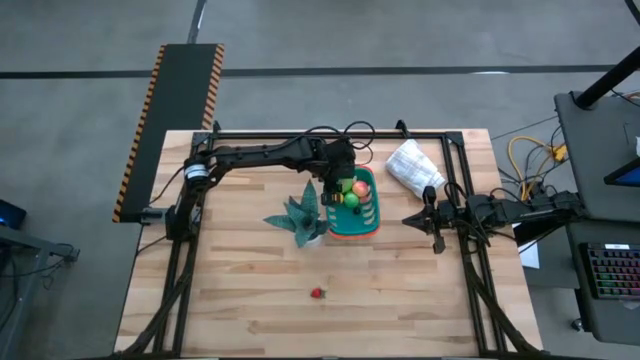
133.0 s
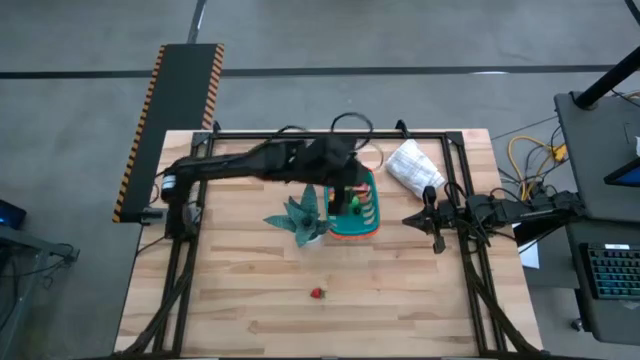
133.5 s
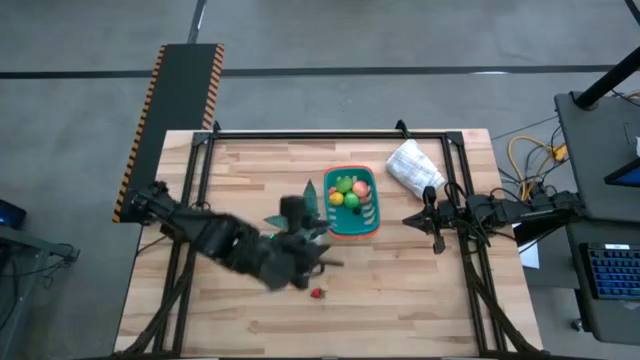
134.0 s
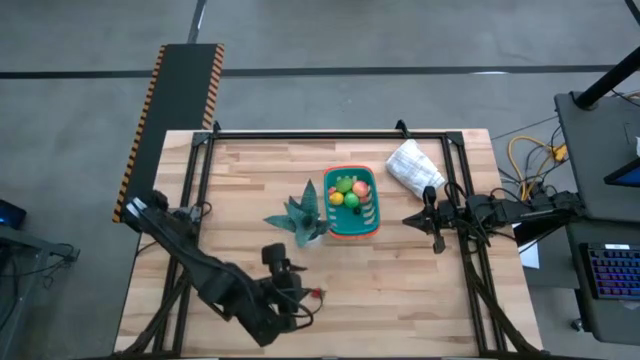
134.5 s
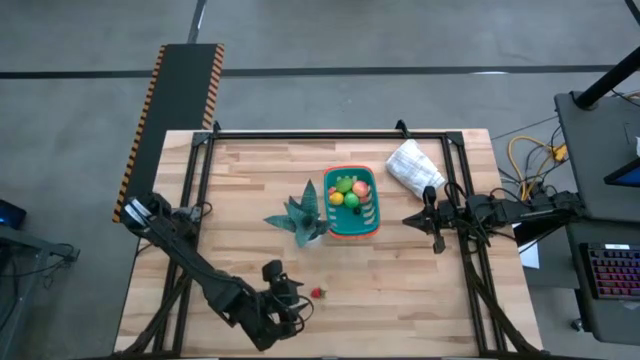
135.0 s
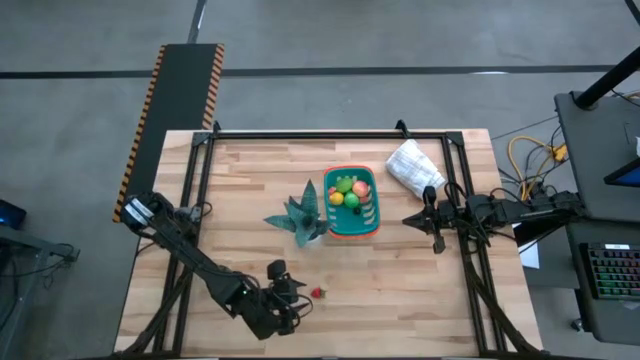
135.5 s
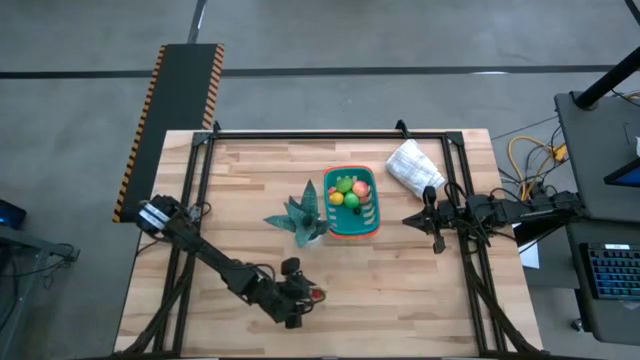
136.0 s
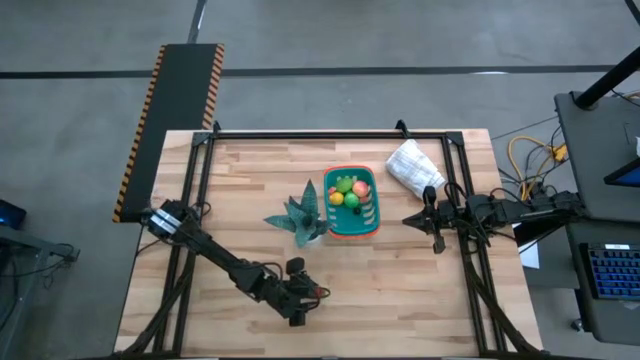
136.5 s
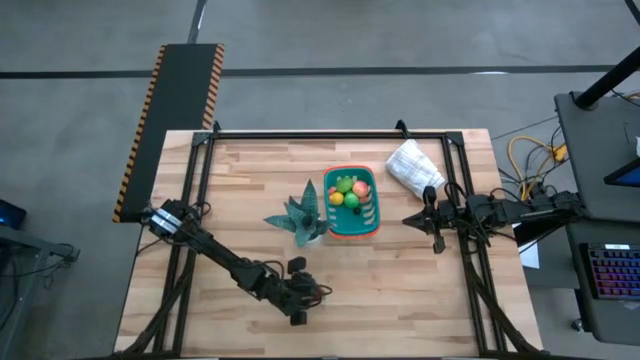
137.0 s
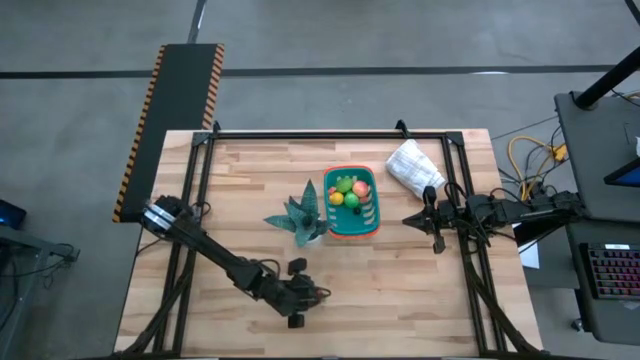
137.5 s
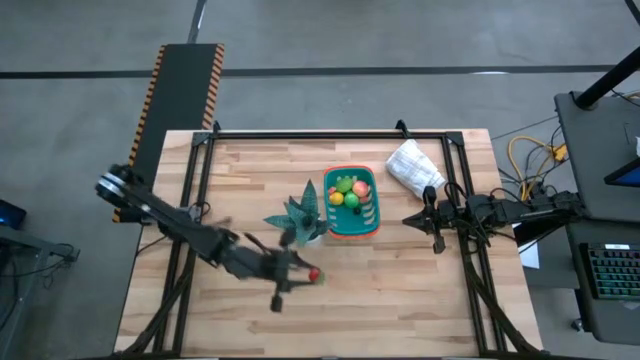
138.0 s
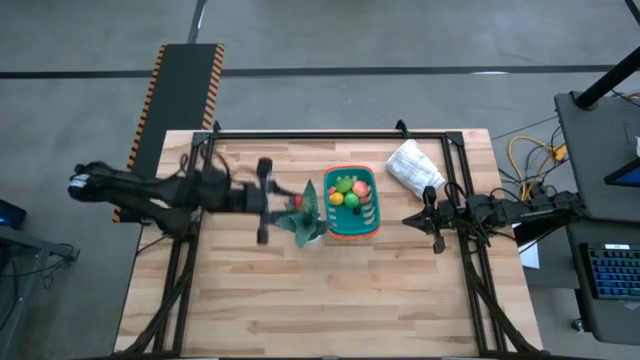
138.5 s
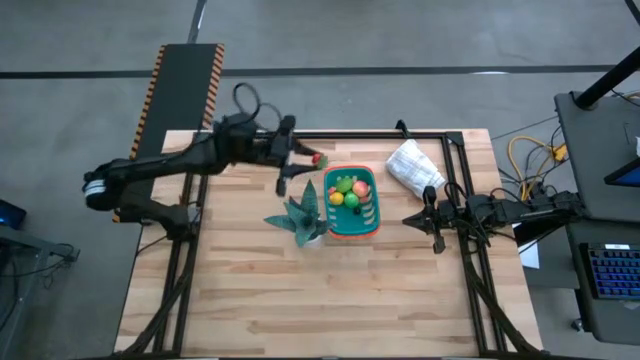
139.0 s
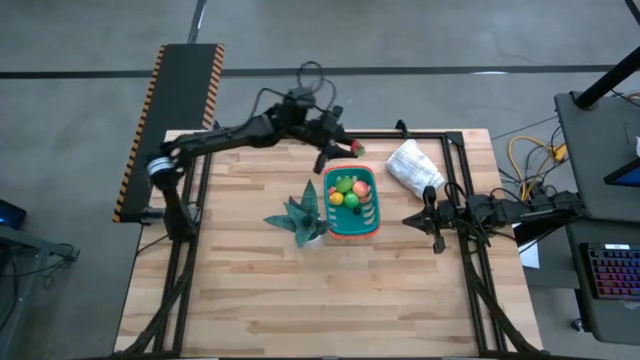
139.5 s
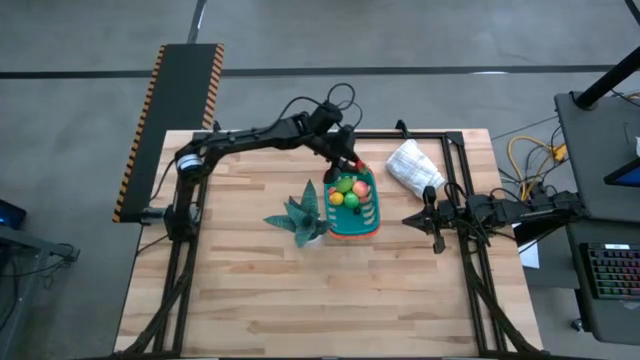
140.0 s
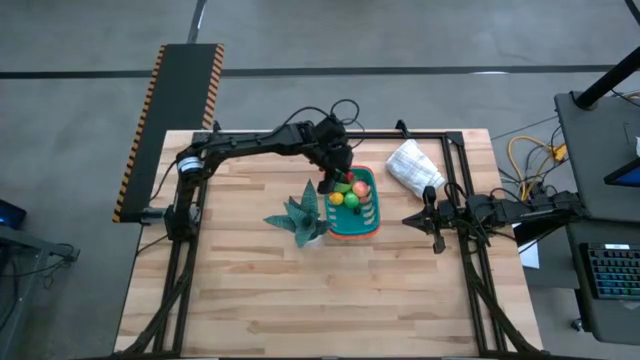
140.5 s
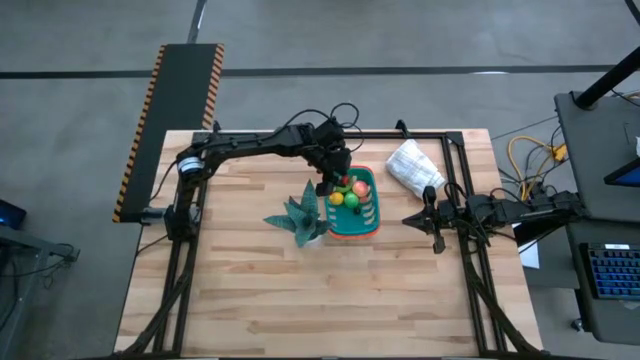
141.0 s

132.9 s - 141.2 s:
Task: Build produce basket
Put the strawberry into the basket

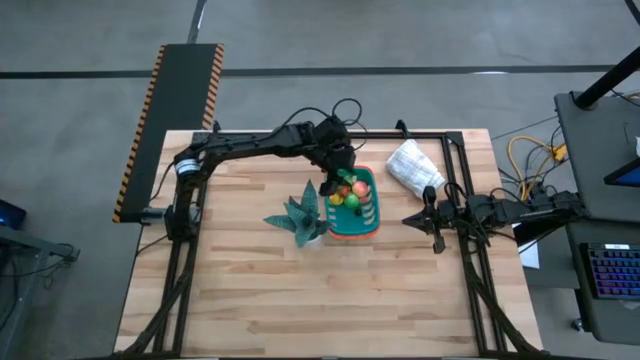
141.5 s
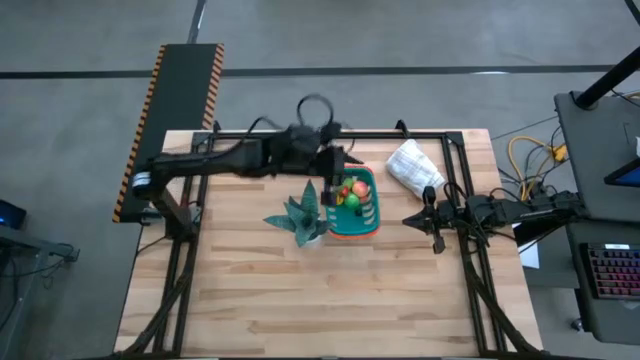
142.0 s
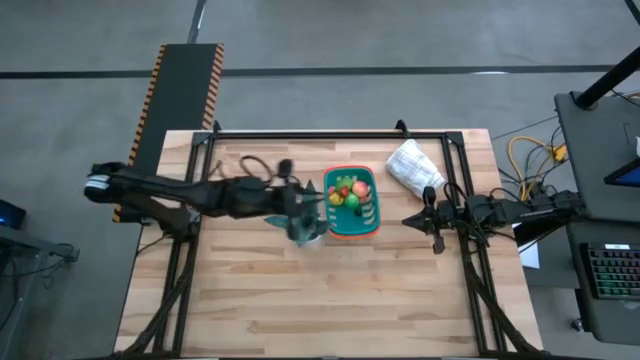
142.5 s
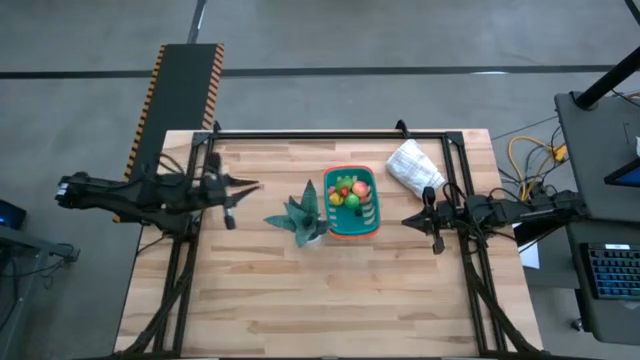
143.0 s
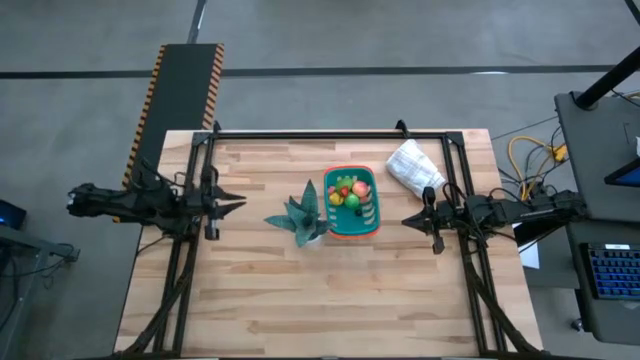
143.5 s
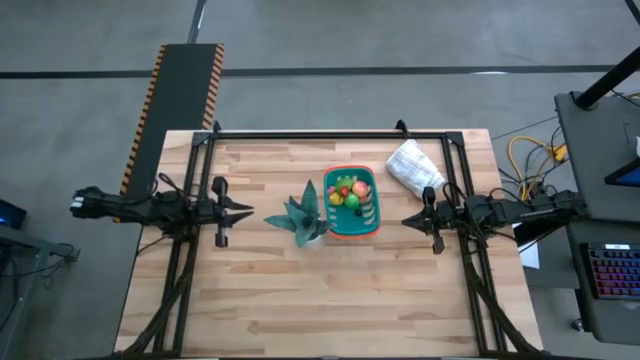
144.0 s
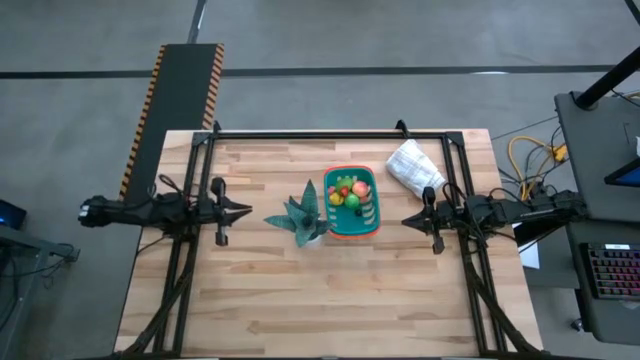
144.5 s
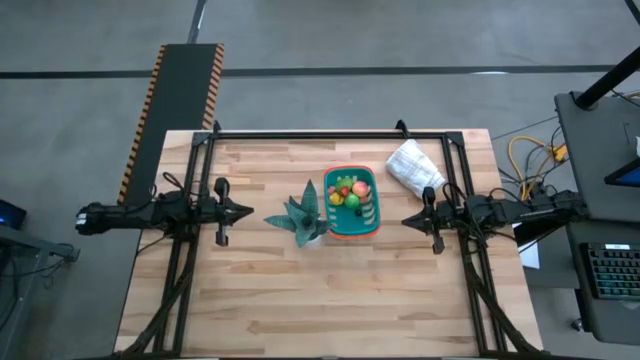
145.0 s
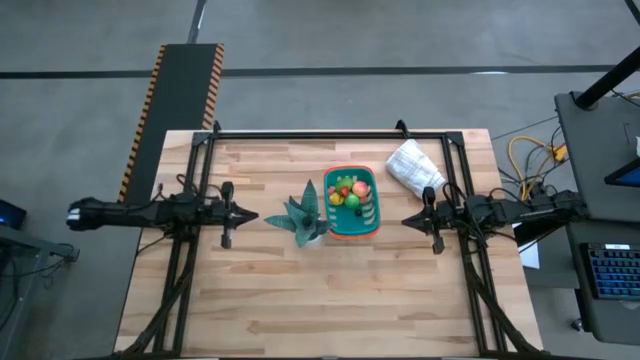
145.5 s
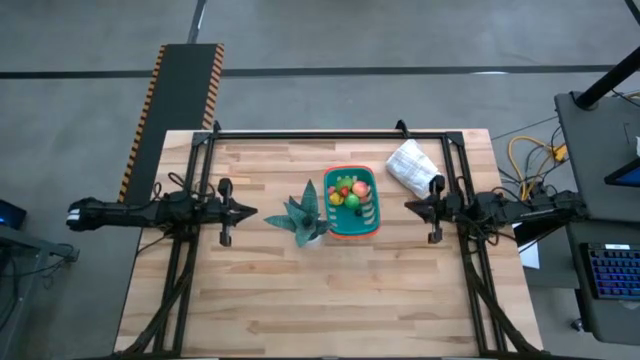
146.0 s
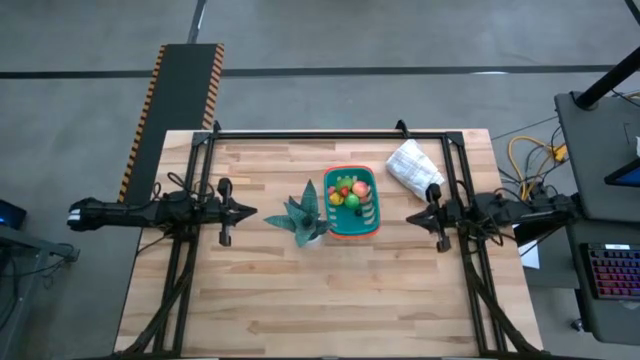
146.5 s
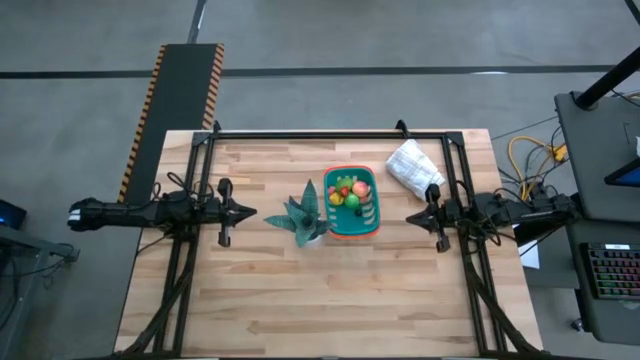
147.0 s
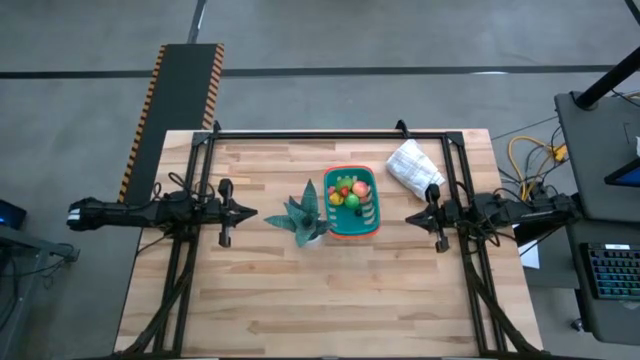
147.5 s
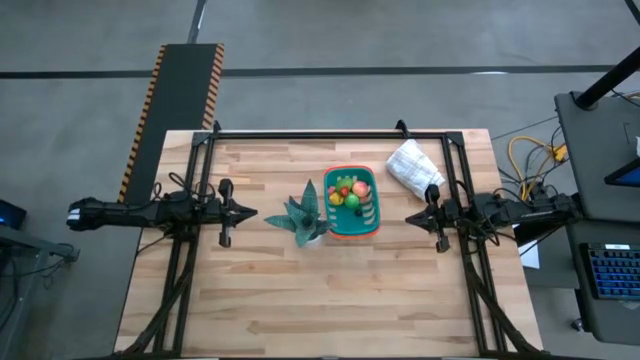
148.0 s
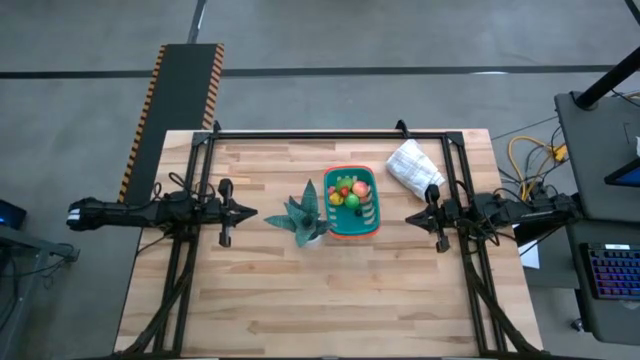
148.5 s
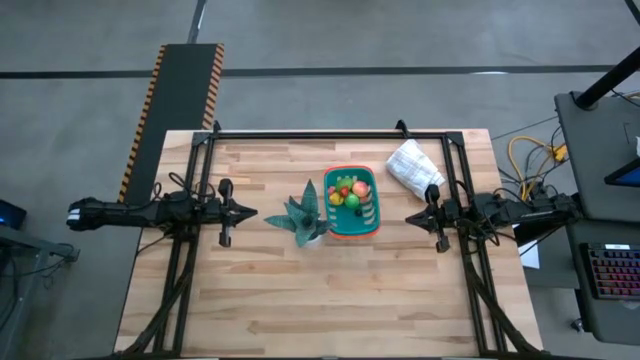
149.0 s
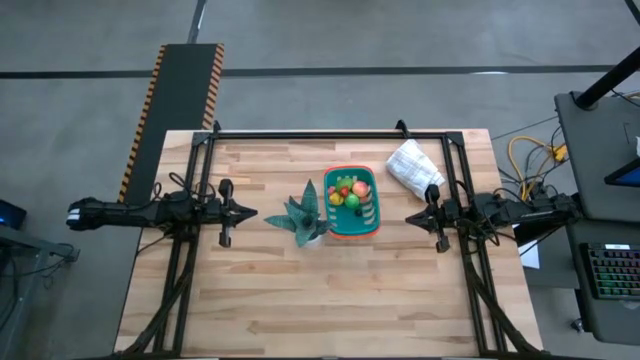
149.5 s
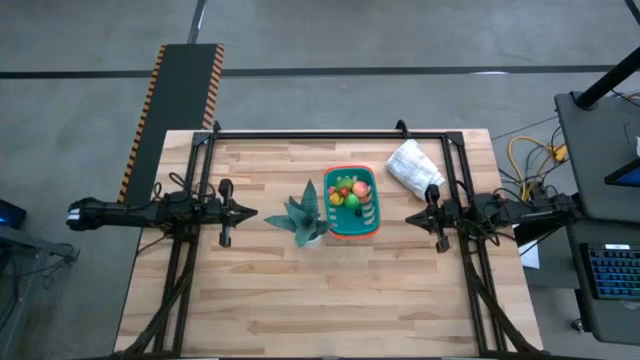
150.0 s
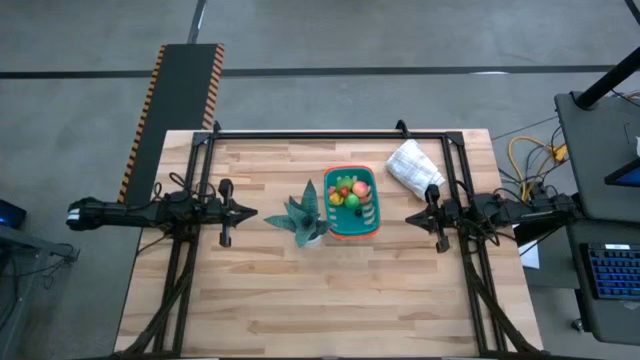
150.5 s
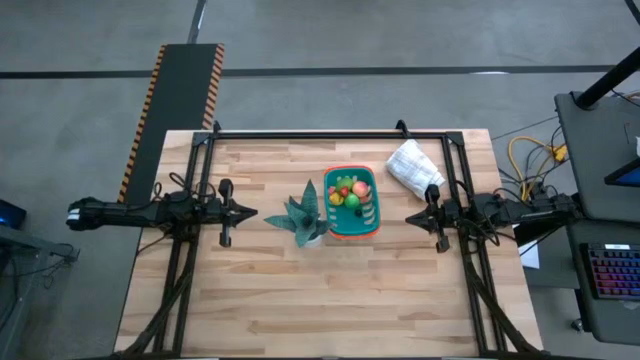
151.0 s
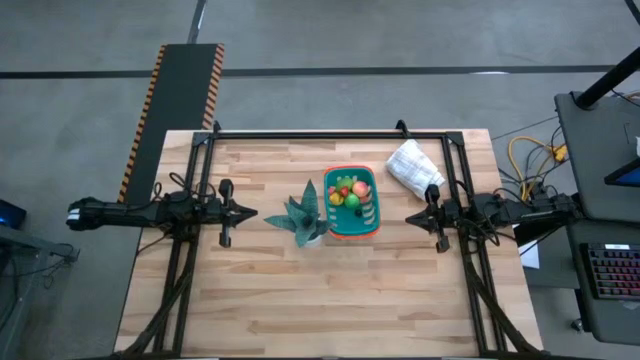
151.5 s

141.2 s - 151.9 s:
Return to Home Position

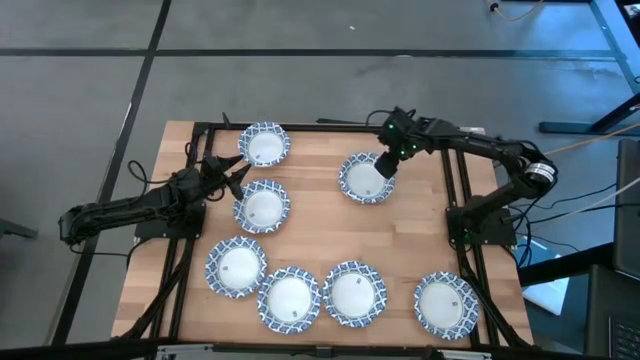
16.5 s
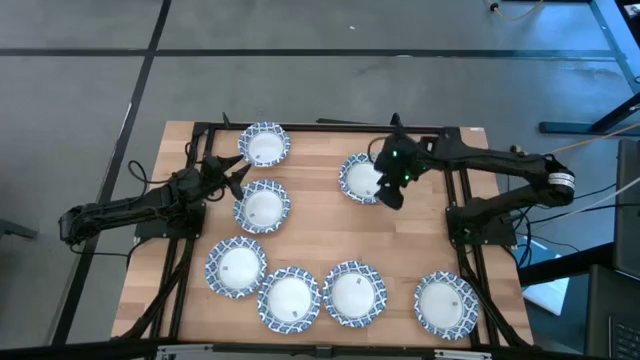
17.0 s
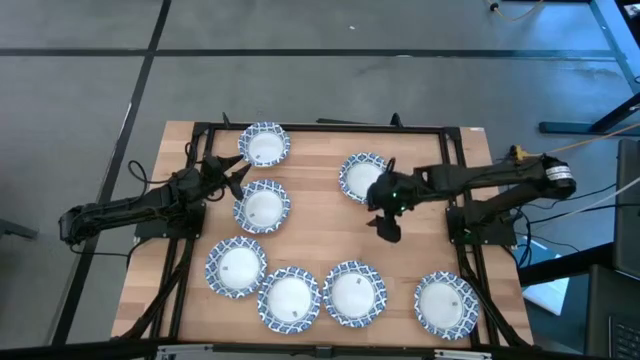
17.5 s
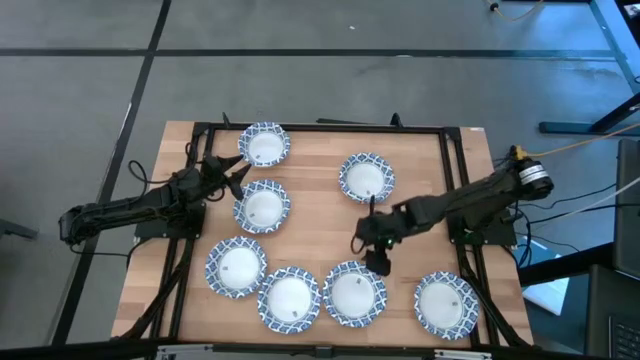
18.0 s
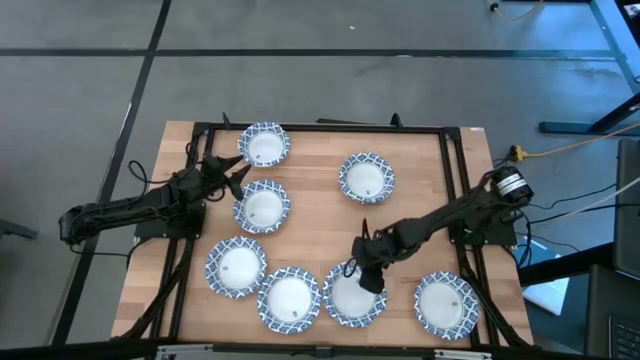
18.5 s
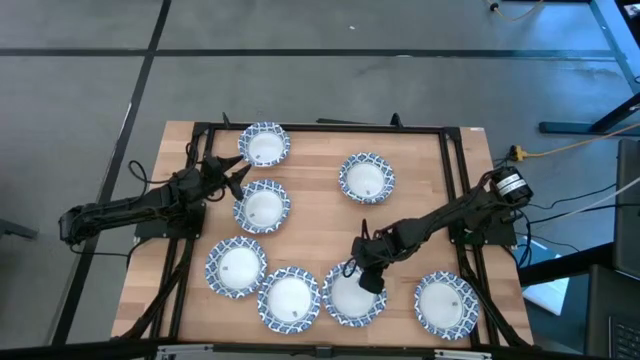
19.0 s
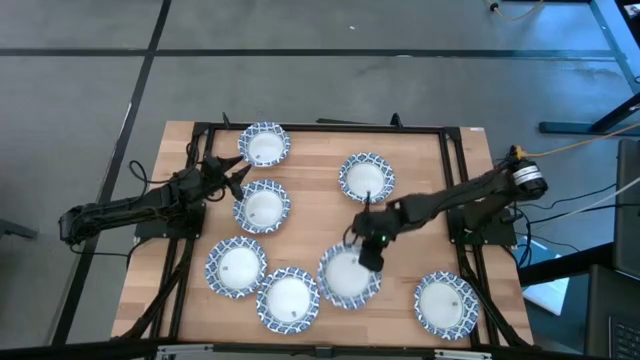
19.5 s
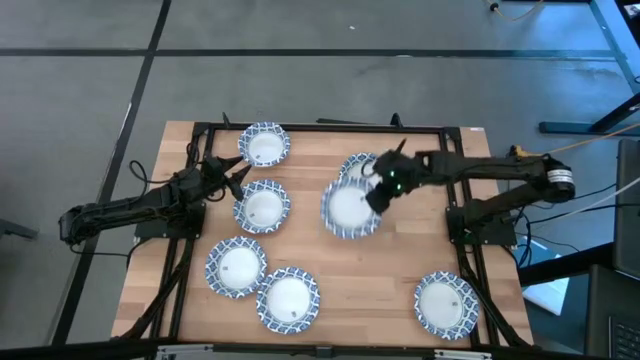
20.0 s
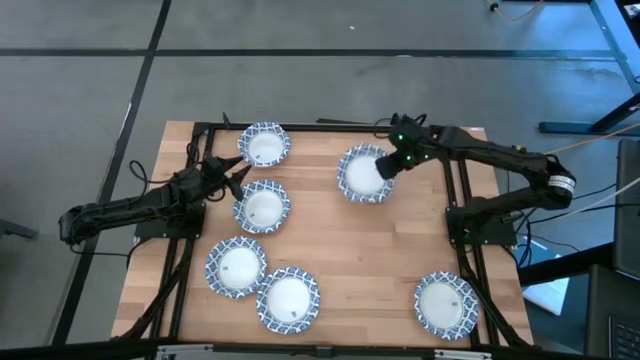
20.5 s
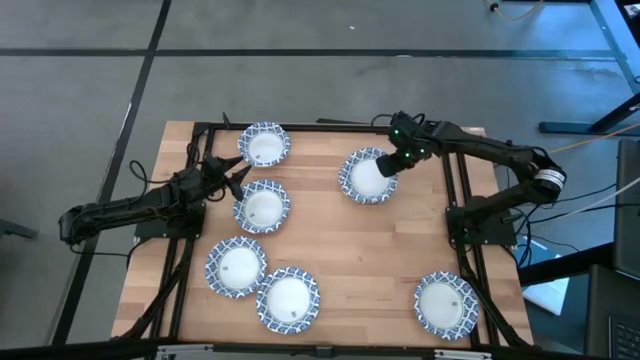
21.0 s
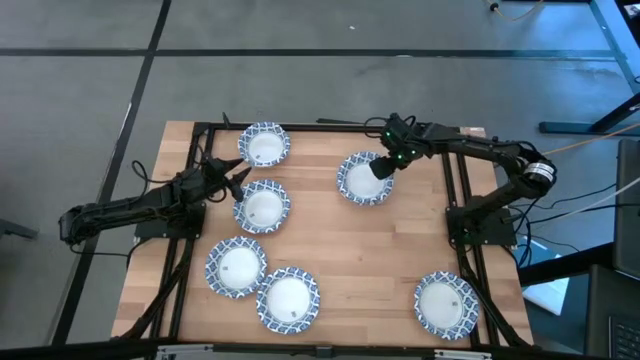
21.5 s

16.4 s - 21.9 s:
Task: Nest bowls inside each other
Stack the white bowl on the white bowl
